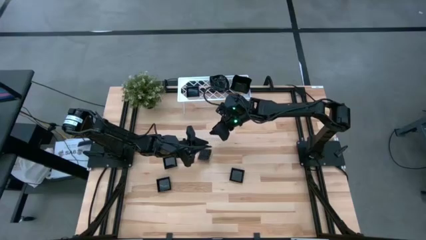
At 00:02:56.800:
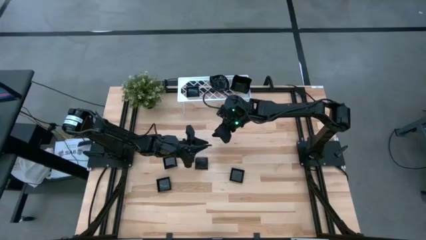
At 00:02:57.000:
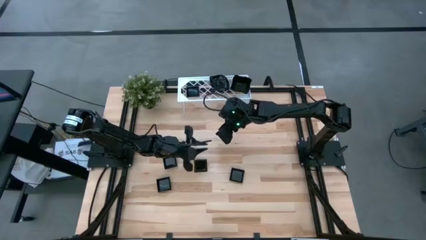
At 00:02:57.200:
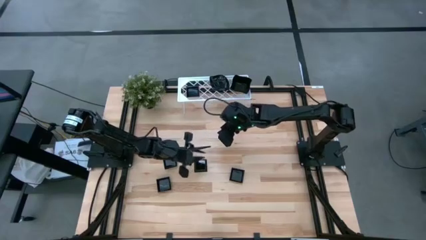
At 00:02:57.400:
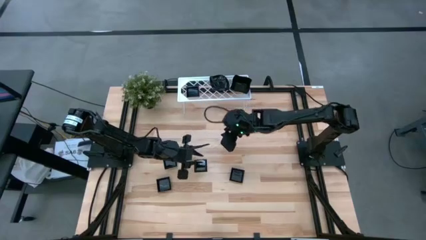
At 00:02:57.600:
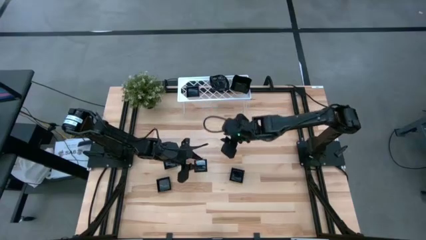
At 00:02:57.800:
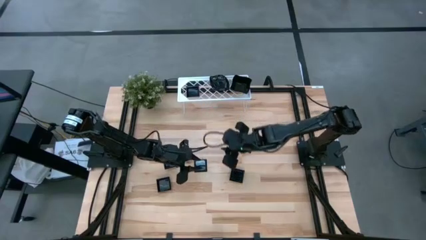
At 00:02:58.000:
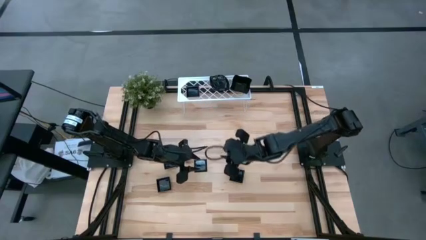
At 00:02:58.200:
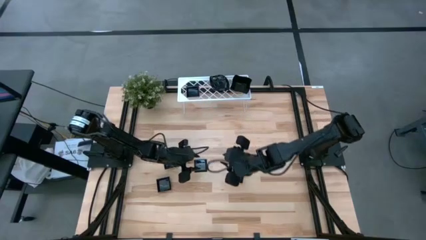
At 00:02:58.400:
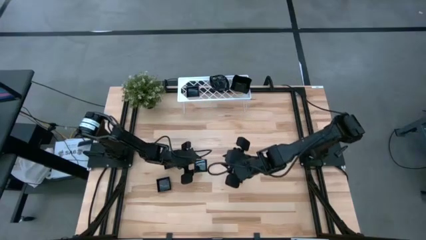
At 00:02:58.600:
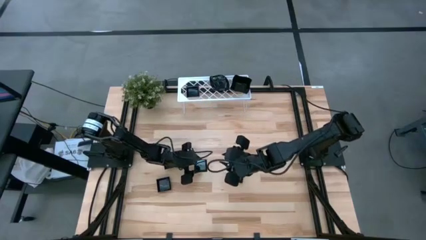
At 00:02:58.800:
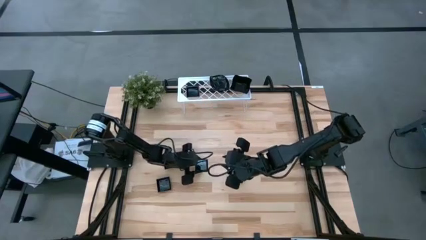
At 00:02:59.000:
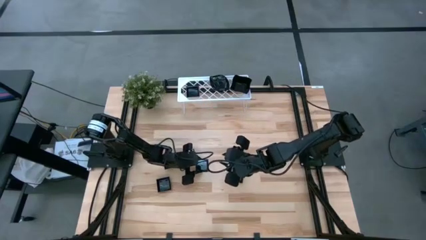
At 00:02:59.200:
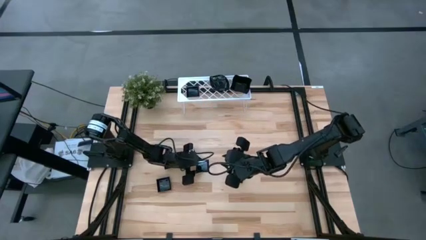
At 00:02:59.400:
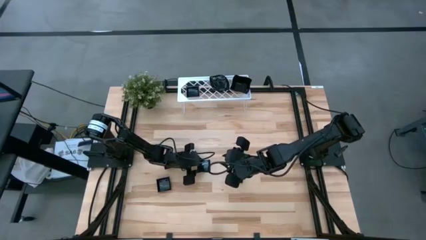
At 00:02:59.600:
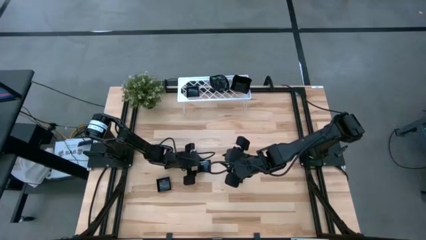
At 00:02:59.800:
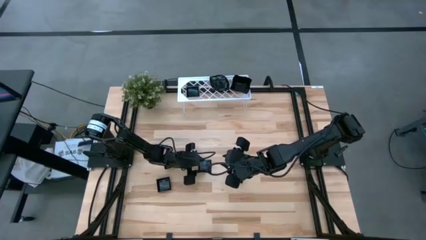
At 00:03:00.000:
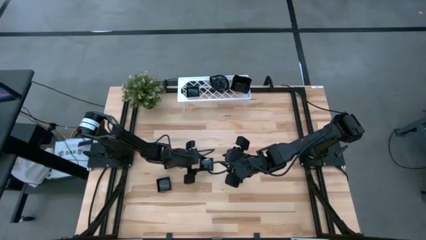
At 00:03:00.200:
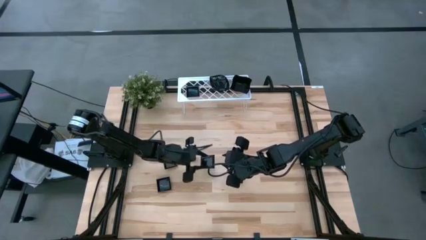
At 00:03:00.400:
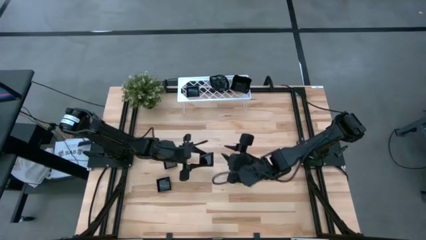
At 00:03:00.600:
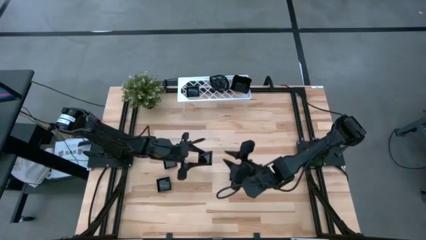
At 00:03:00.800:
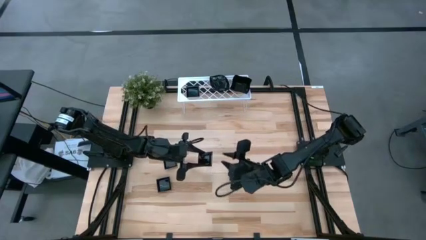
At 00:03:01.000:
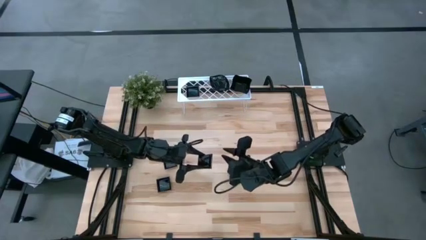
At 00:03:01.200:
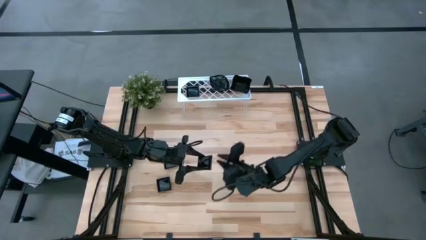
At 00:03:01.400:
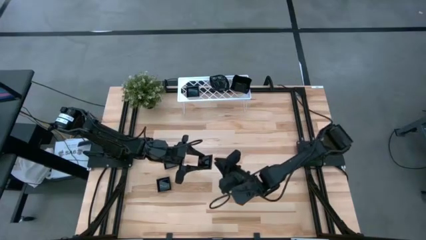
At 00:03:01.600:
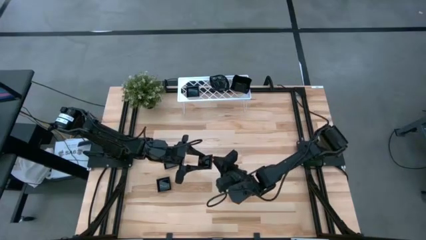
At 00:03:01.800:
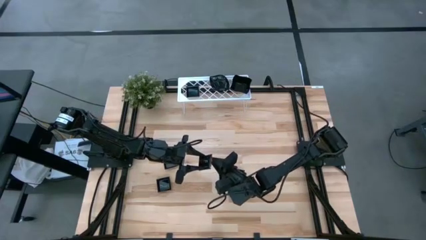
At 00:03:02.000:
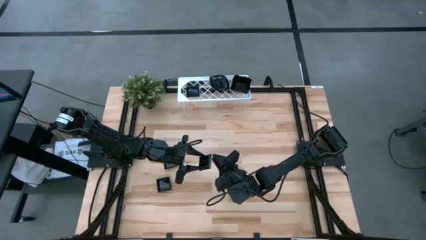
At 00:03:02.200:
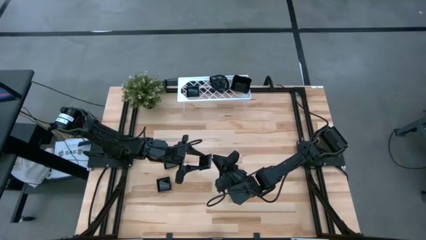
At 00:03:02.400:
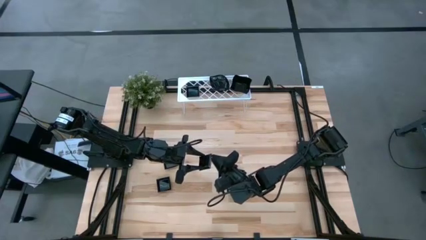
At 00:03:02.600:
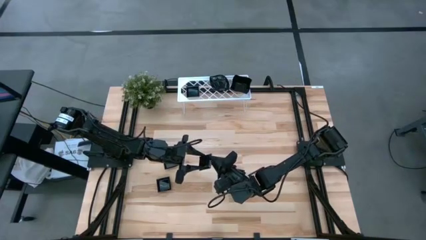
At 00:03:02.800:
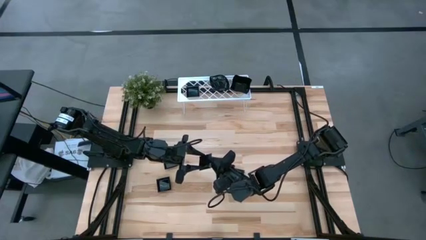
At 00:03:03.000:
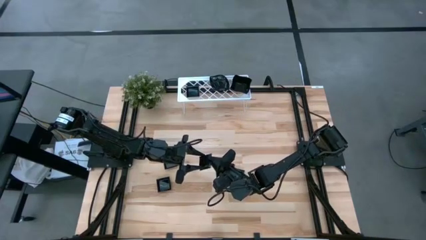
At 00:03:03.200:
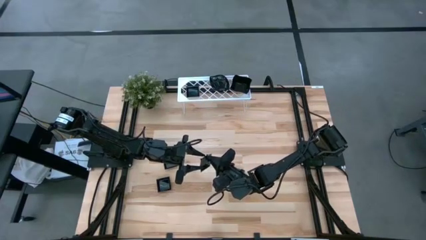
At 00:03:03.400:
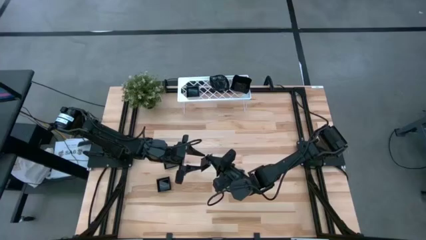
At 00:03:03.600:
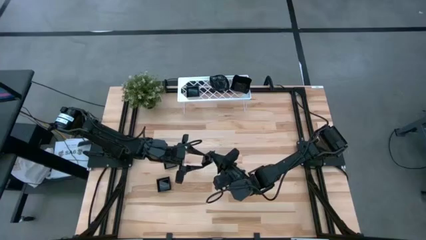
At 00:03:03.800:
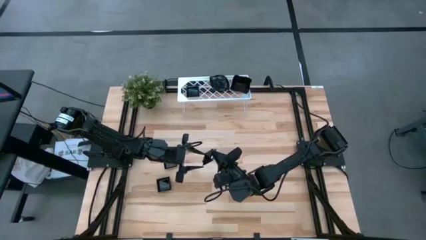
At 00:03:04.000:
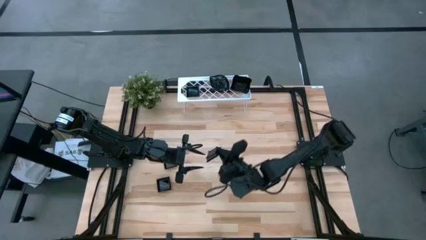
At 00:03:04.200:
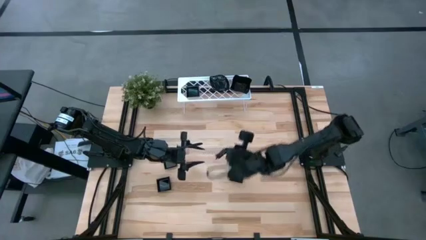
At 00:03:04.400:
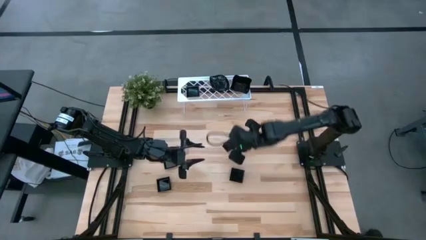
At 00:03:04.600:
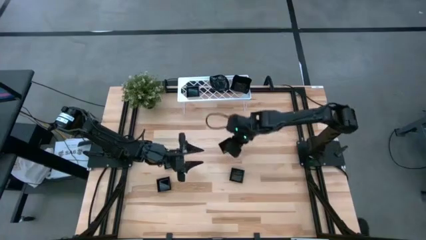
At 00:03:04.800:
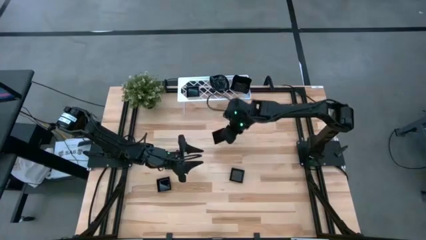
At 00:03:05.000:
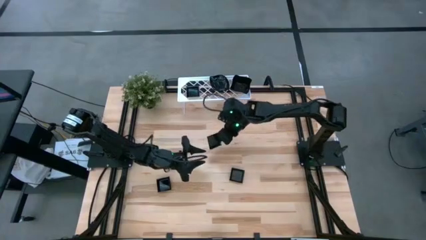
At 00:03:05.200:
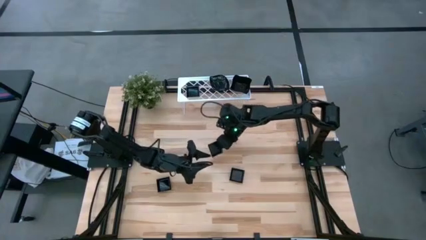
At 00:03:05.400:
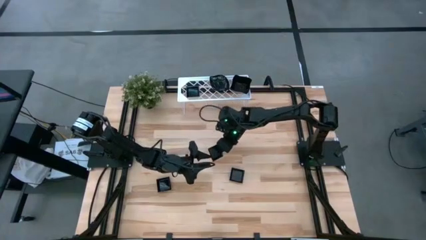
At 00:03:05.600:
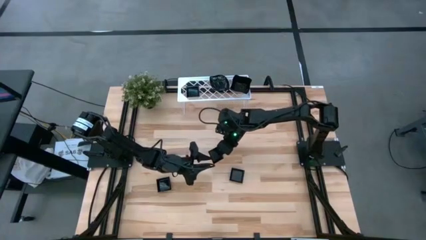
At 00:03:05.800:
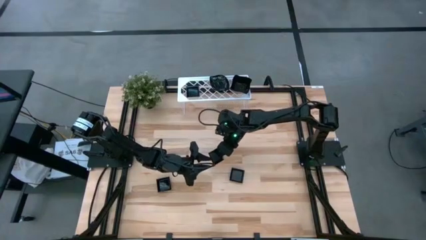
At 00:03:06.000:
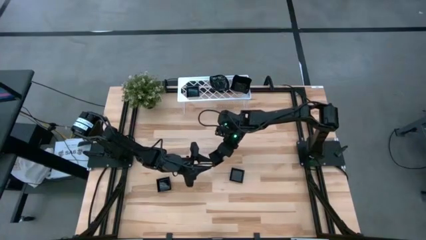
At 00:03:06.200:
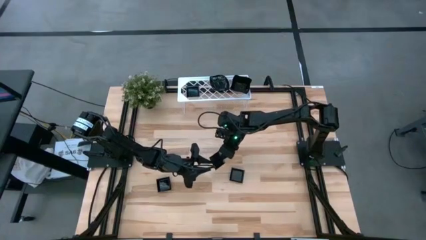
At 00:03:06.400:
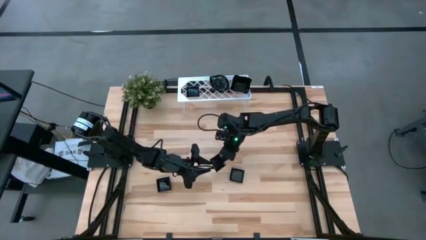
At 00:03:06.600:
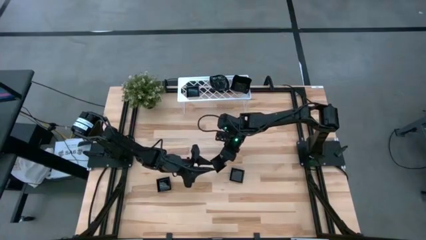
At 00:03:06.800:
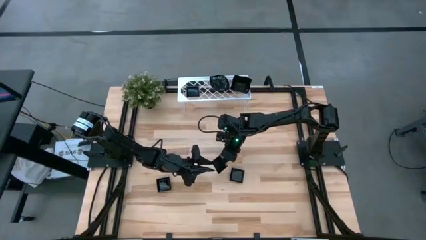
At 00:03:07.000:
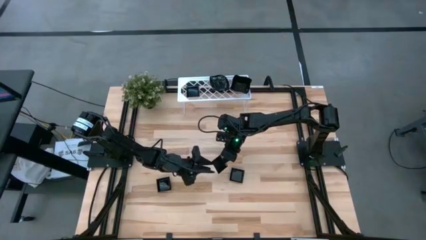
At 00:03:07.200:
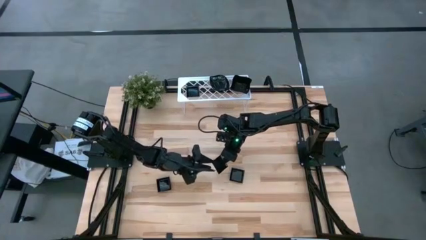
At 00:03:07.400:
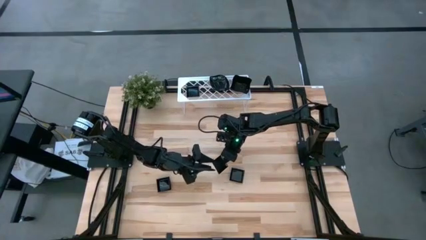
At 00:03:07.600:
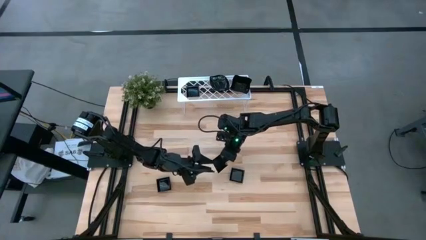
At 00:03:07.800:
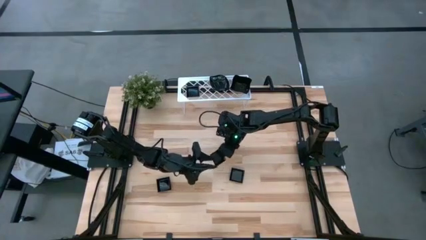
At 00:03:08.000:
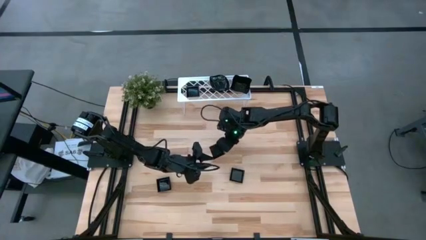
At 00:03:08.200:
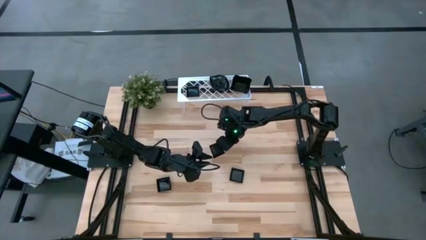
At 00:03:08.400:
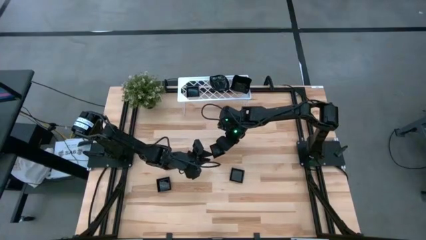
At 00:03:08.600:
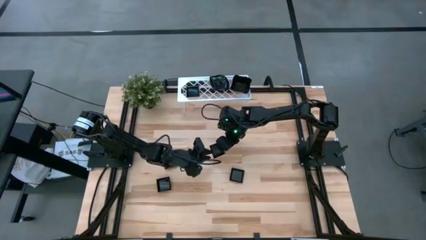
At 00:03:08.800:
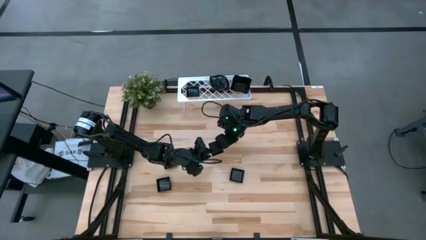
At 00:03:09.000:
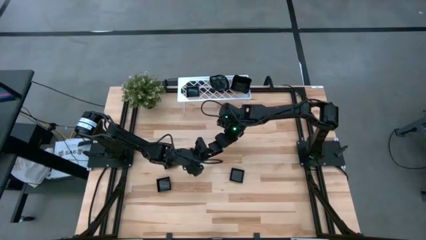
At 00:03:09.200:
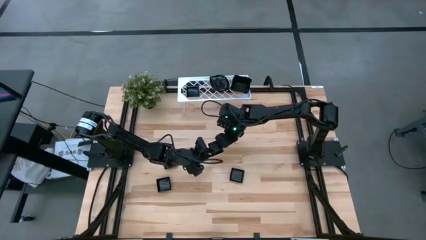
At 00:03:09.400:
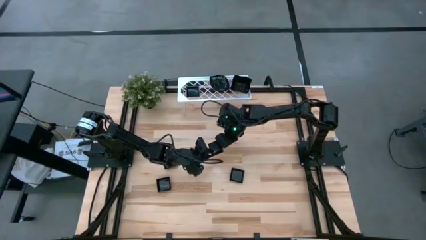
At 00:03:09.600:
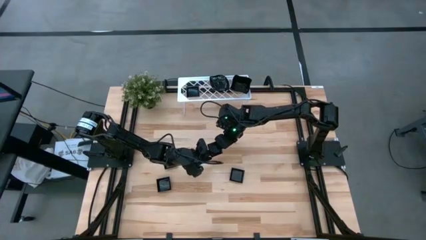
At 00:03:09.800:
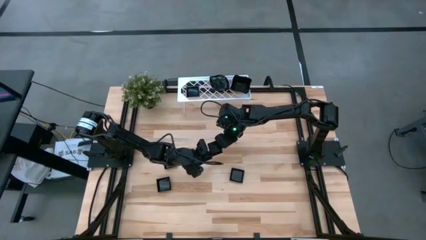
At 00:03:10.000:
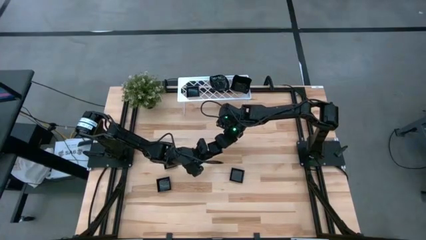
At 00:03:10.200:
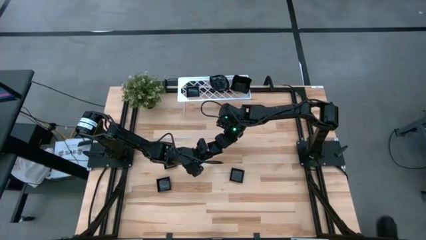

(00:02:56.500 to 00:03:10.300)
Task: Pick & Place Mini shaped plates
Stack the black square plate on top of the black square plate on the shelf
